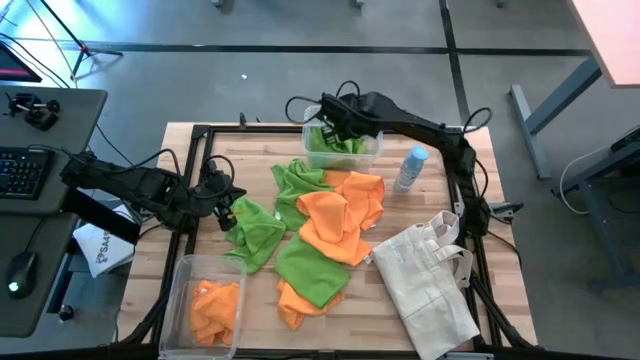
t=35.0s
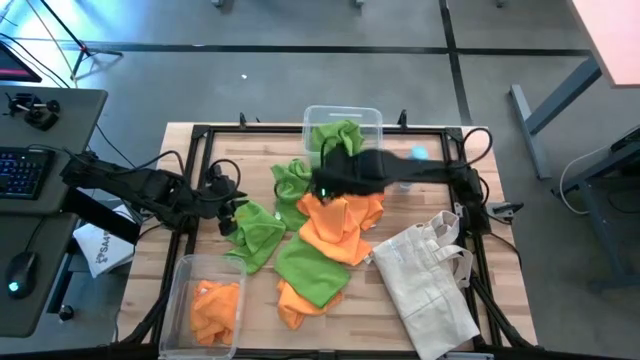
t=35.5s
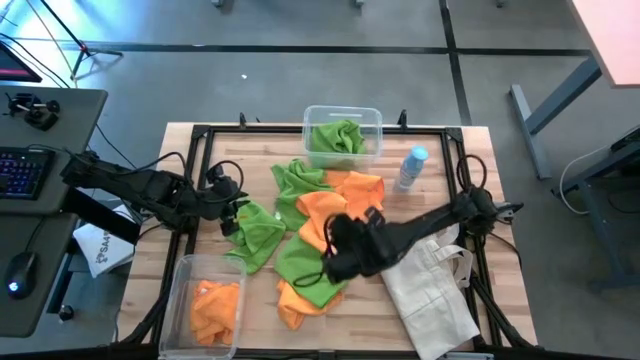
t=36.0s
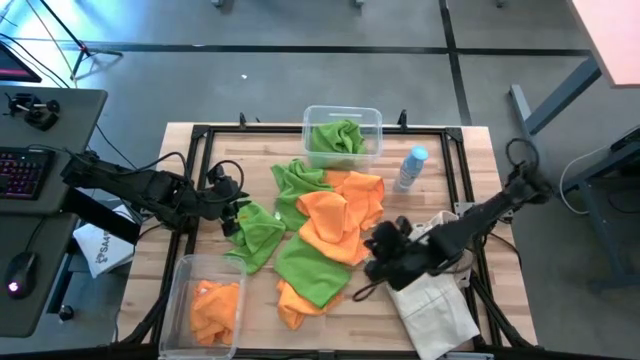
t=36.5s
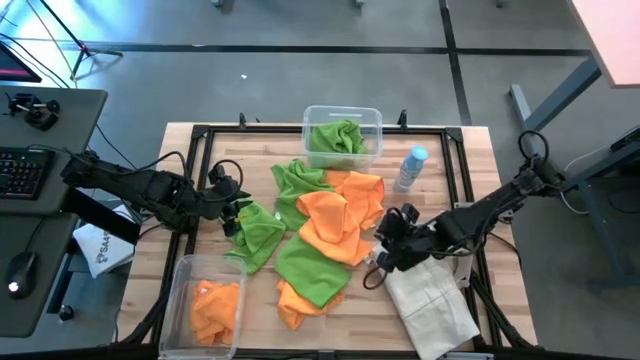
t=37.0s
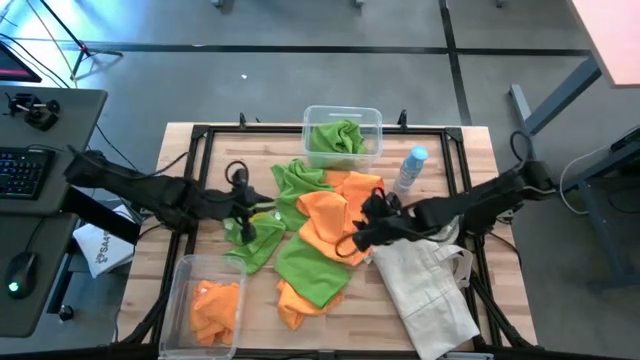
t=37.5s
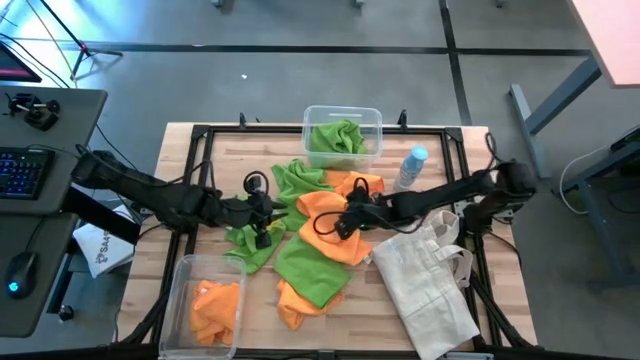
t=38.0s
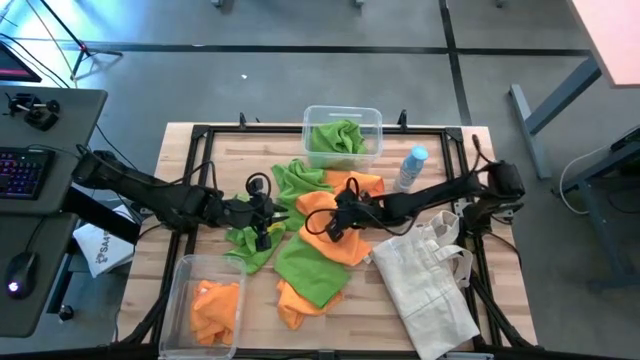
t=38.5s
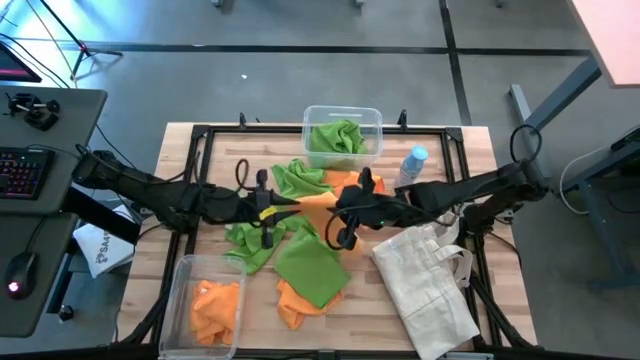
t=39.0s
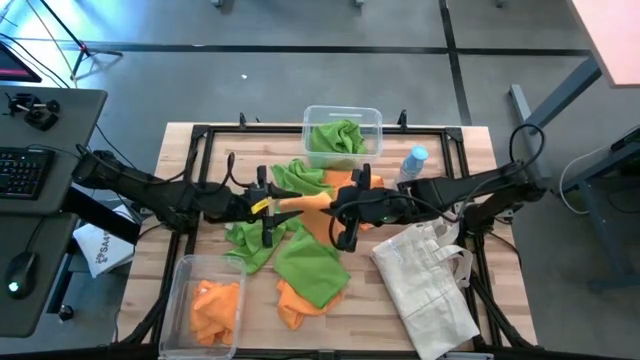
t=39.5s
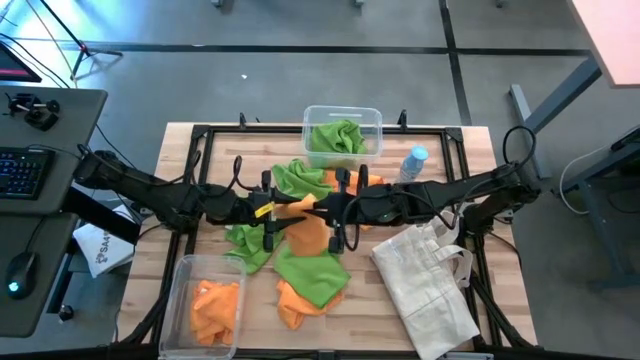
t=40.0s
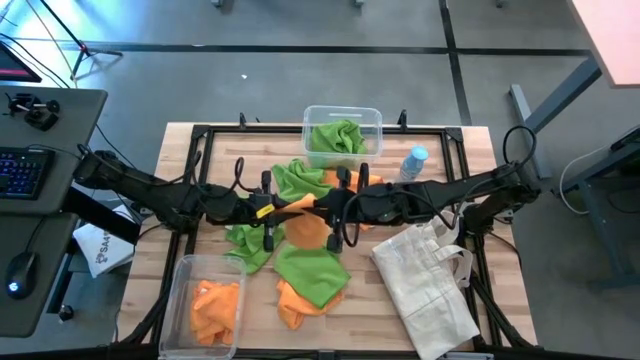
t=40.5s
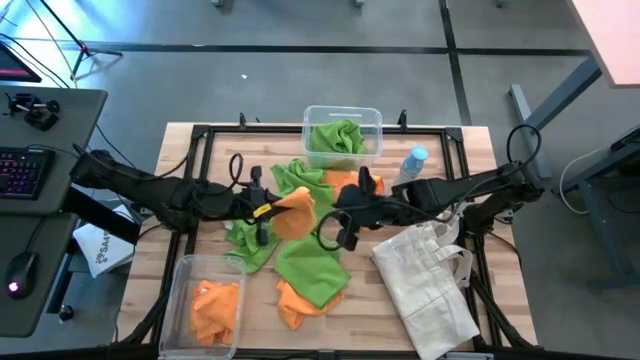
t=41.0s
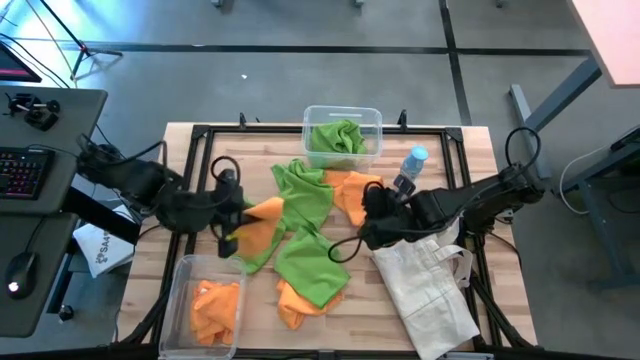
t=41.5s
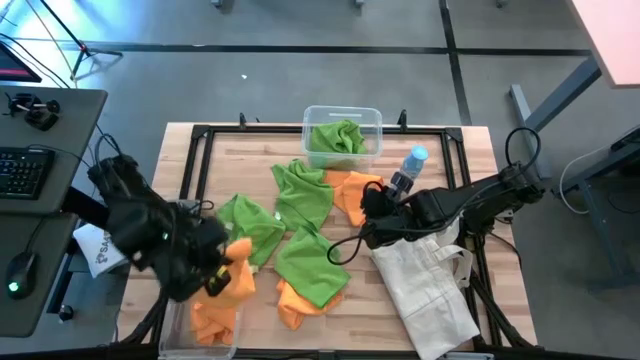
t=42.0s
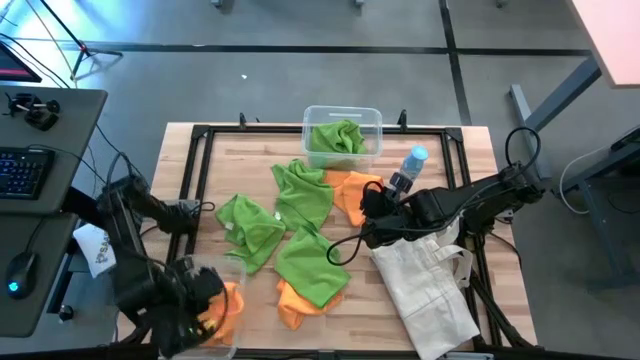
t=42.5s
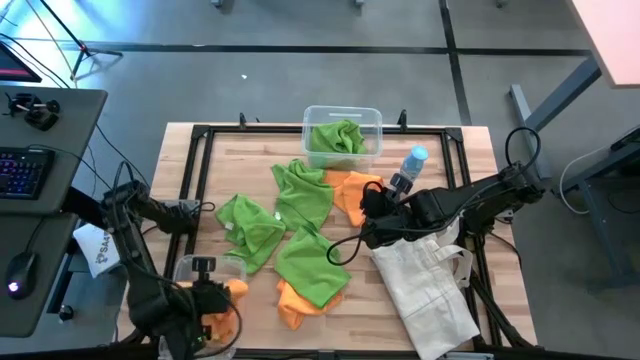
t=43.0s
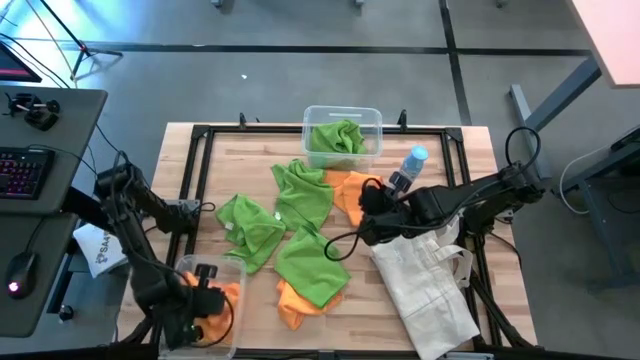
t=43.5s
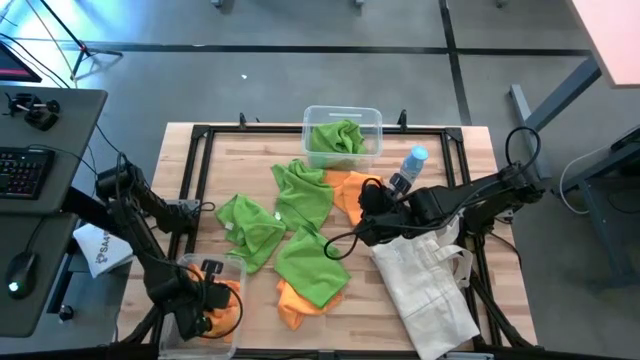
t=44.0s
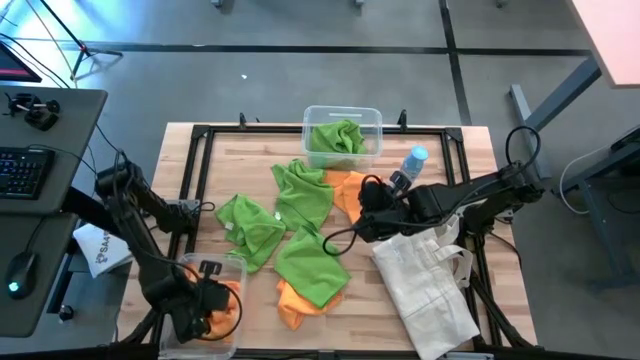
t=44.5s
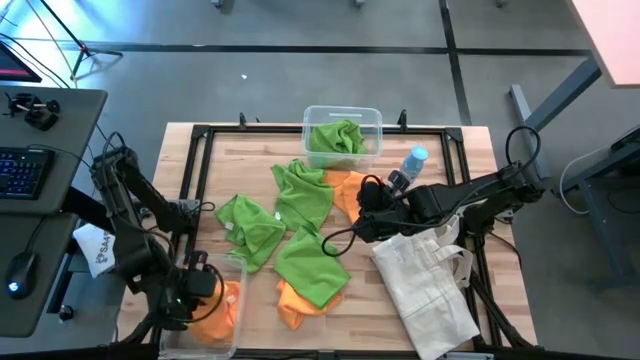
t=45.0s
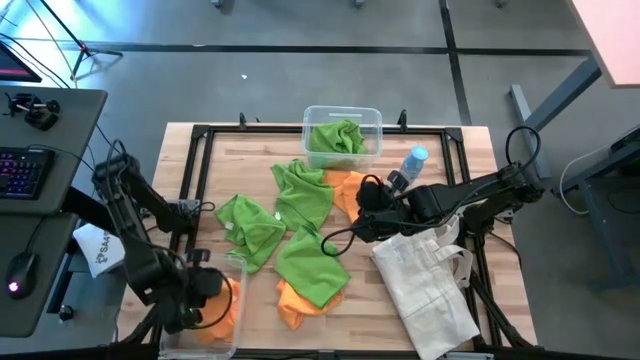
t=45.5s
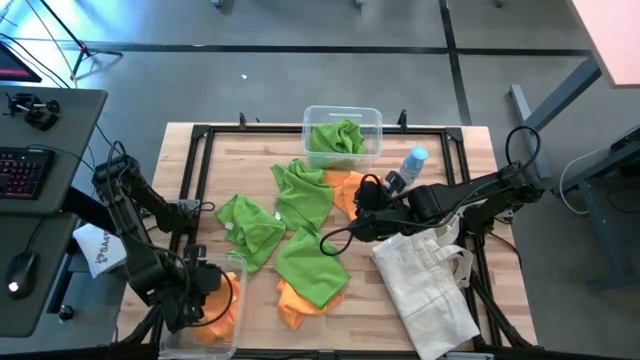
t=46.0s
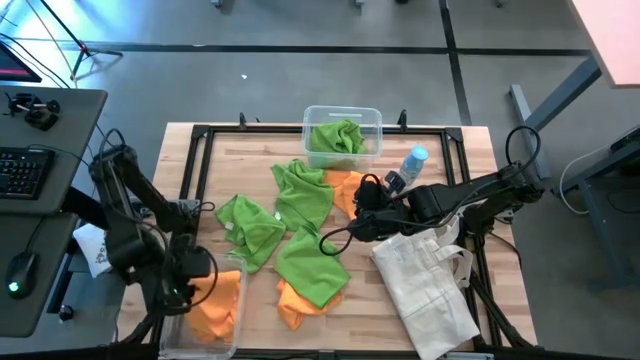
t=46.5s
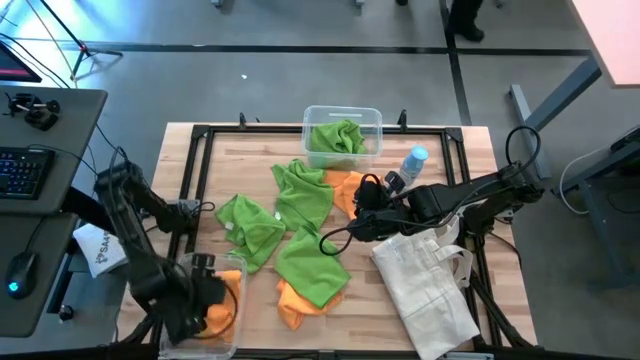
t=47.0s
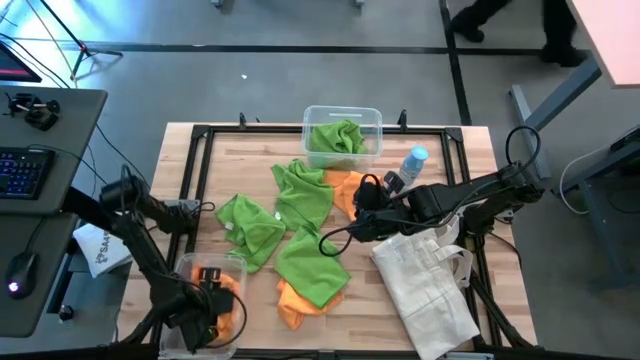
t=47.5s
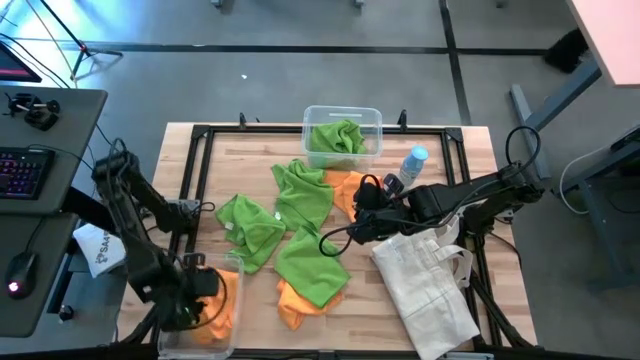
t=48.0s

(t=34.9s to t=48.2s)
Task: Sort microfiber towel by color & place in baskets
Put the orange microfiber towel into the bottom transparent bin

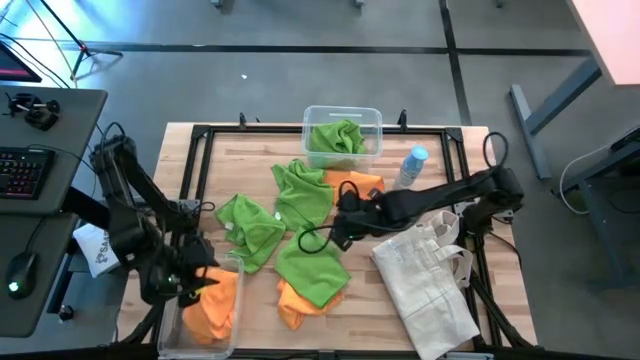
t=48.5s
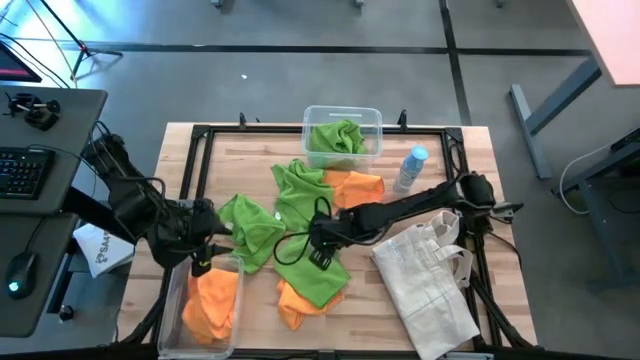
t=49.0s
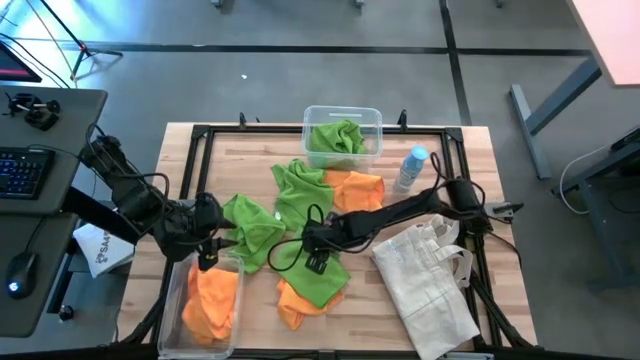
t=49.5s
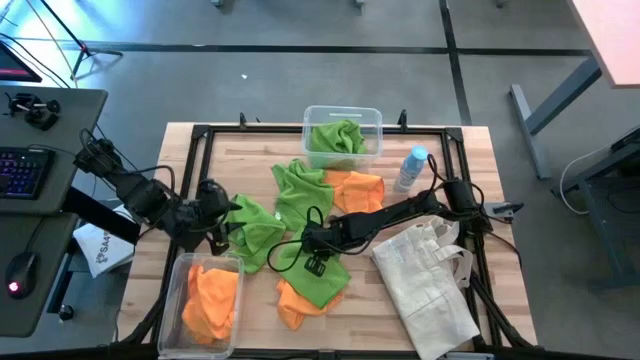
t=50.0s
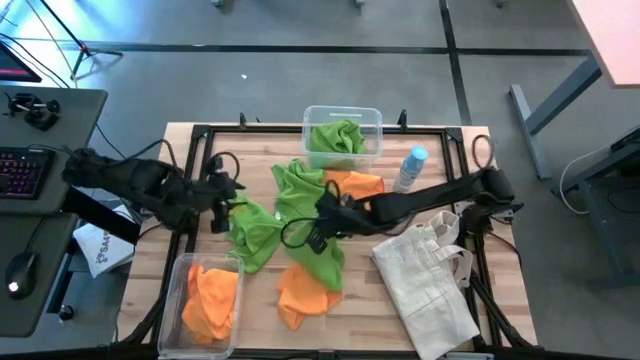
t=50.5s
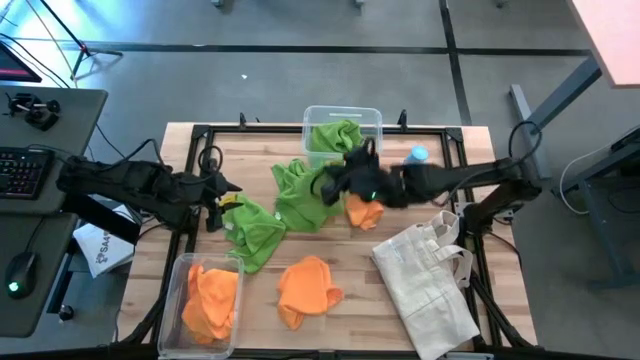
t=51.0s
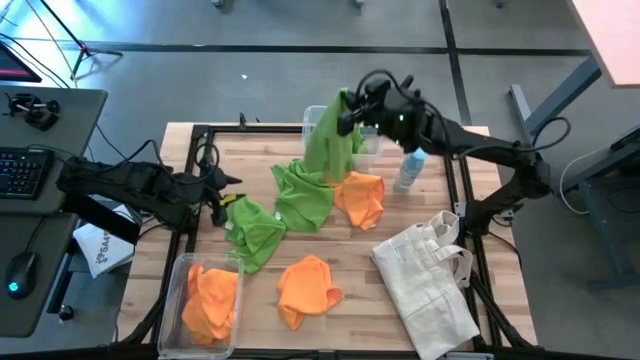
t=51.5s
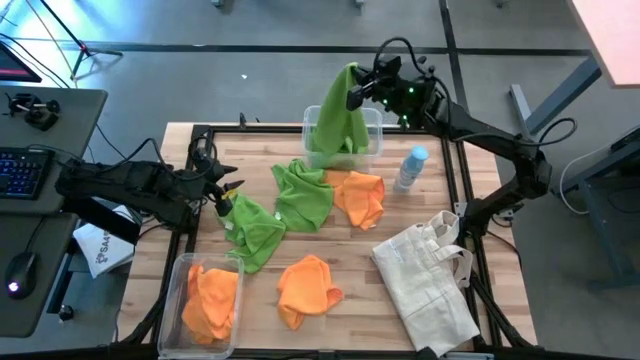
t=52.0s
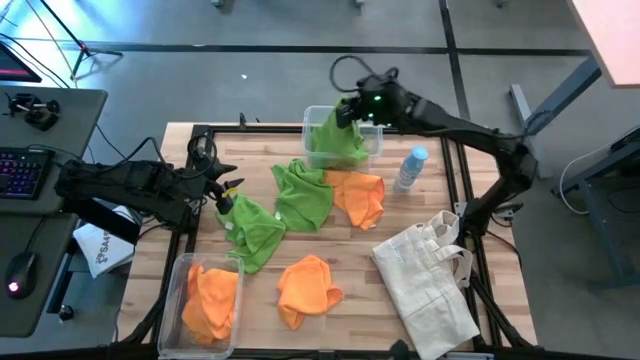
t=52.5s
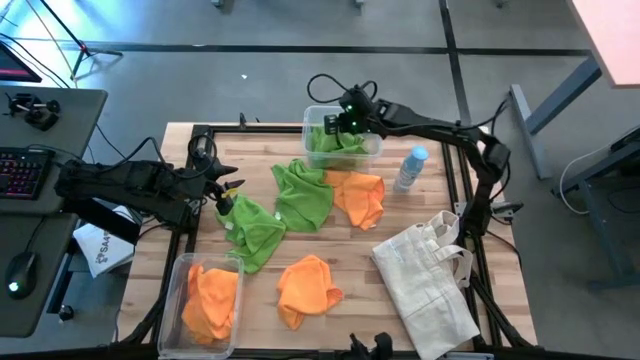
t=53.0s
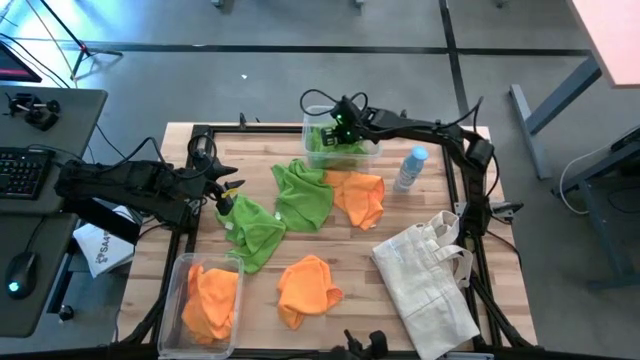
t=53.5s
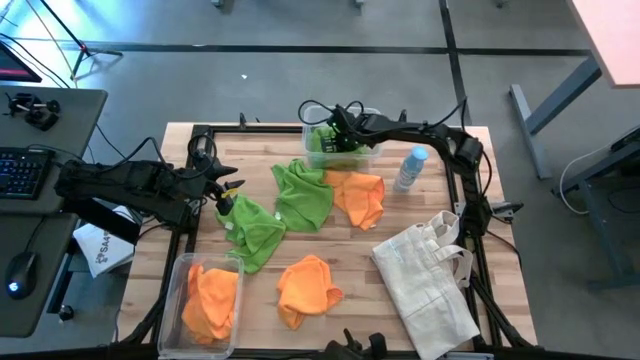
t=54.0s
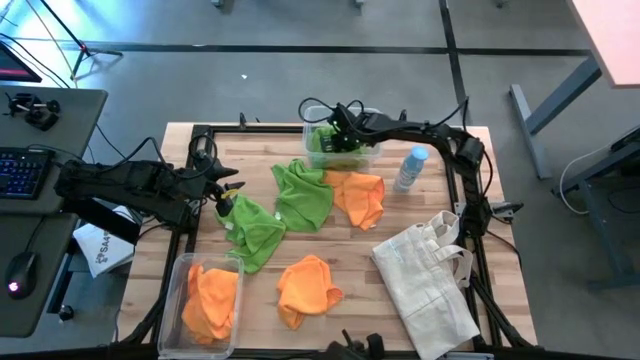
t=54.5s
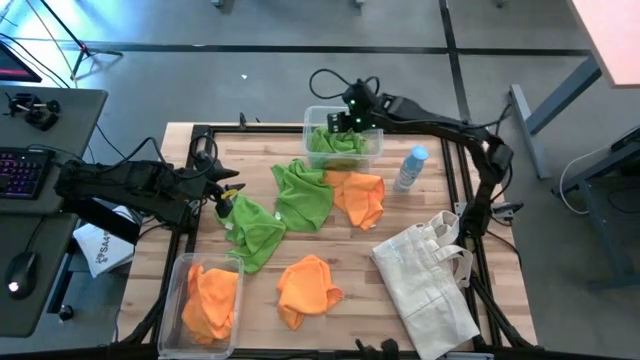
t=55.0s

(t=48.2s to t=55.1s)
Put the green microfiber towel into the top transparent bin

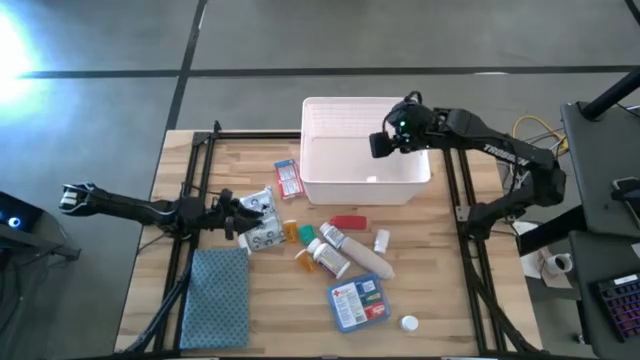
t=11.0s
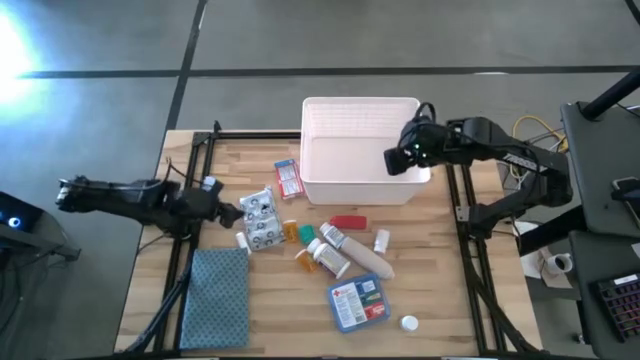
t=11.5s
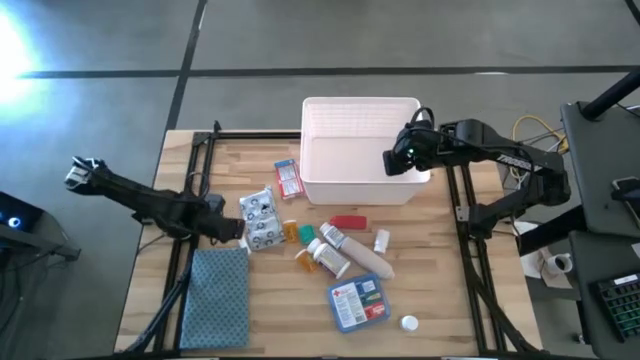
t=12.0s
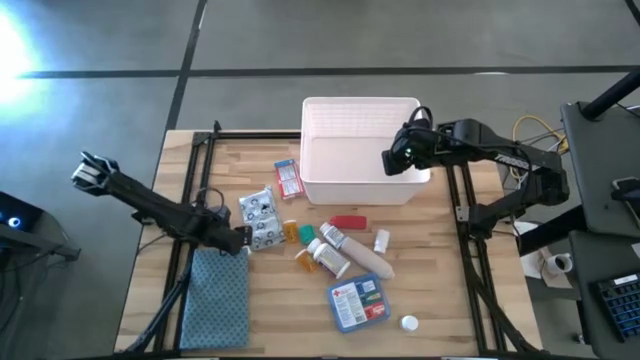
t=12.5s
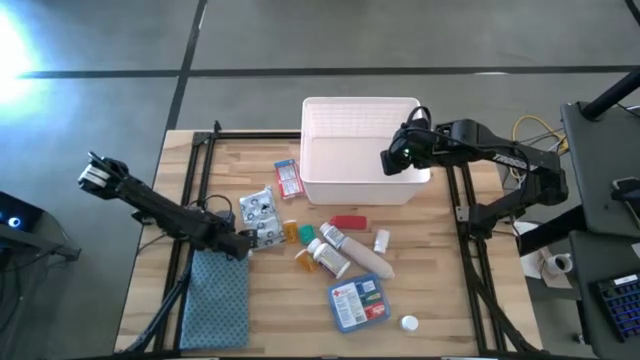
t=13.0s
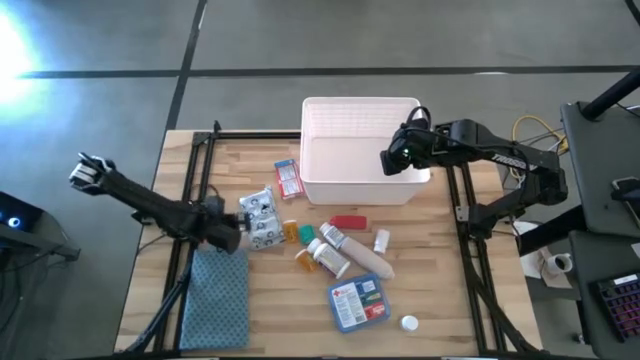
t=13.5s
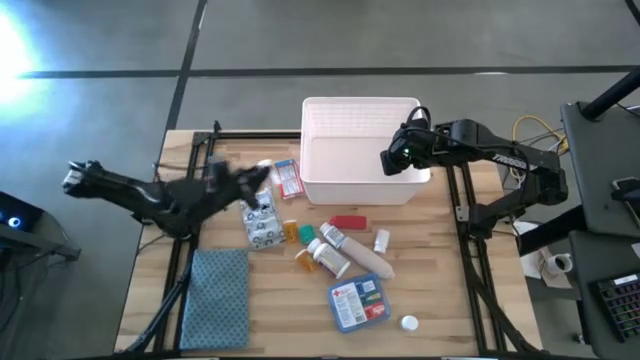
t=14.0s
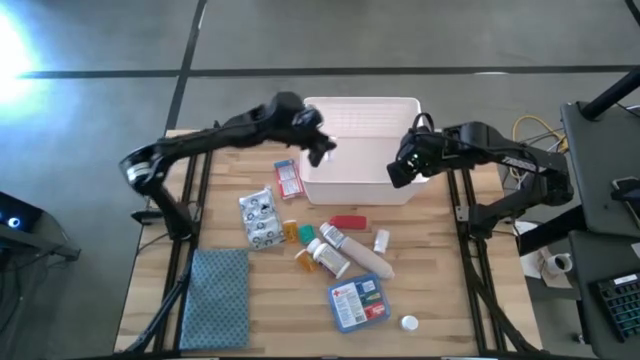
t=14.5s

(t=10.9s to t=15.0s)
Task: Pick & place medical supplies in basket/bin
Put the white roll gauze into the bin
